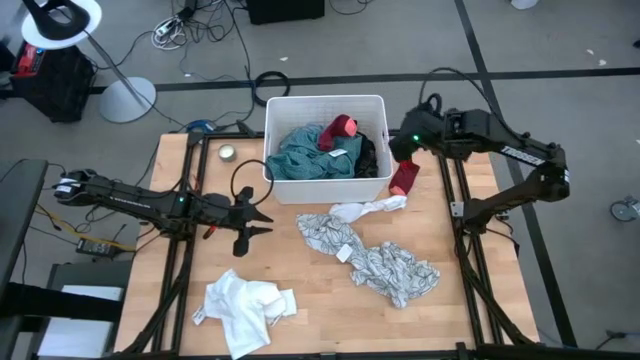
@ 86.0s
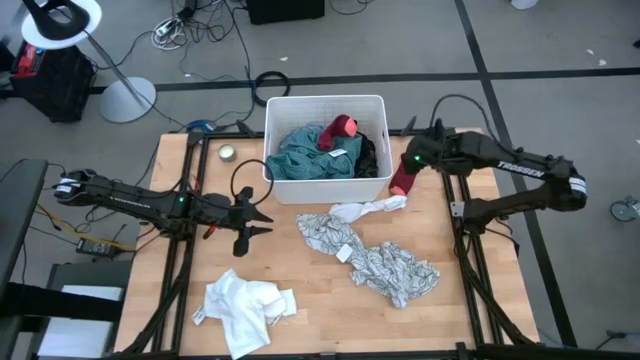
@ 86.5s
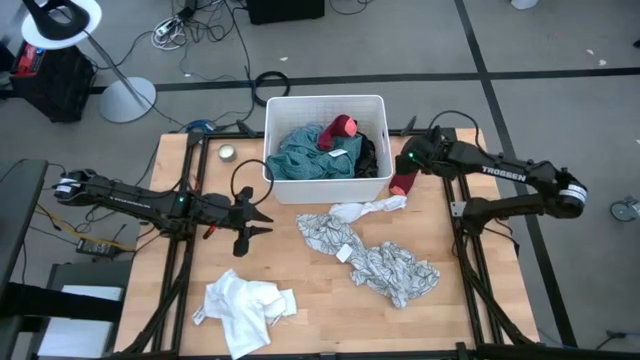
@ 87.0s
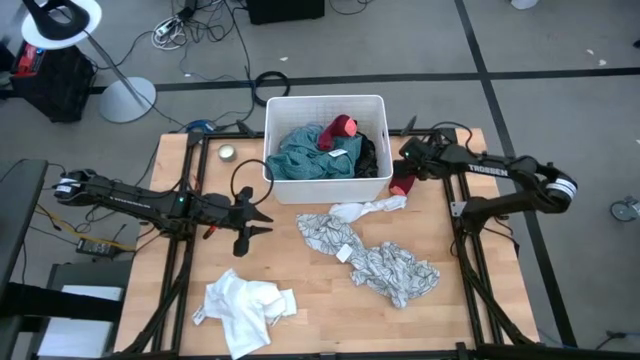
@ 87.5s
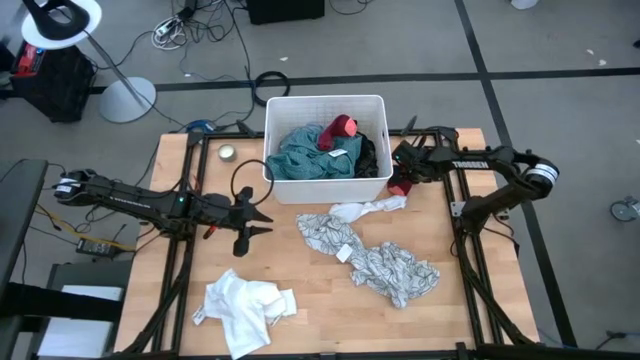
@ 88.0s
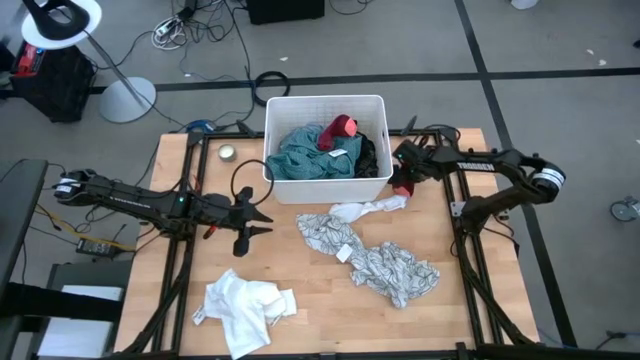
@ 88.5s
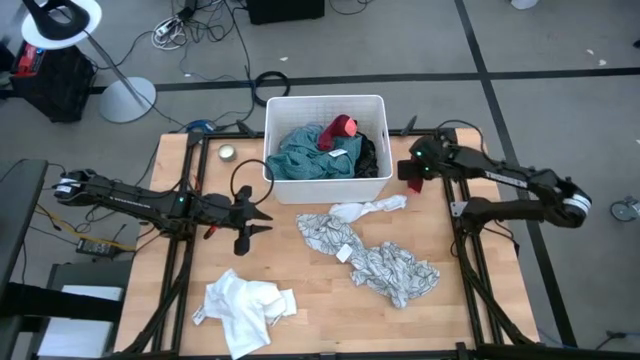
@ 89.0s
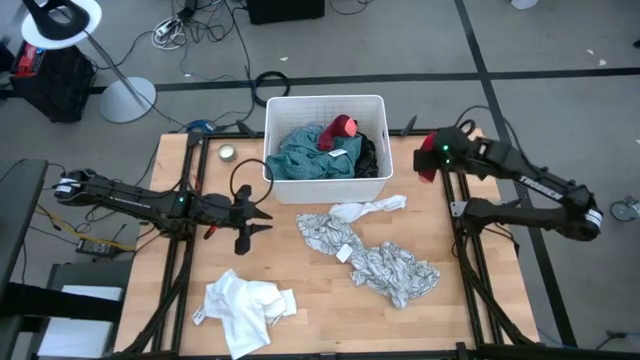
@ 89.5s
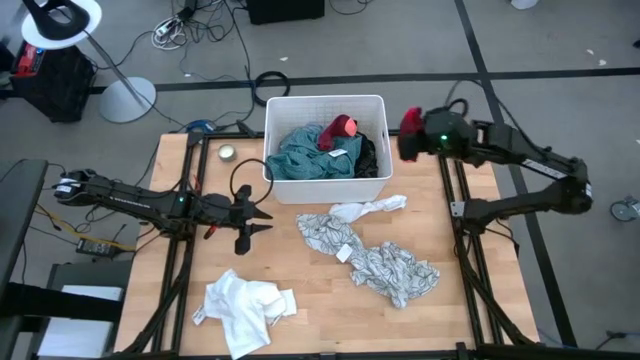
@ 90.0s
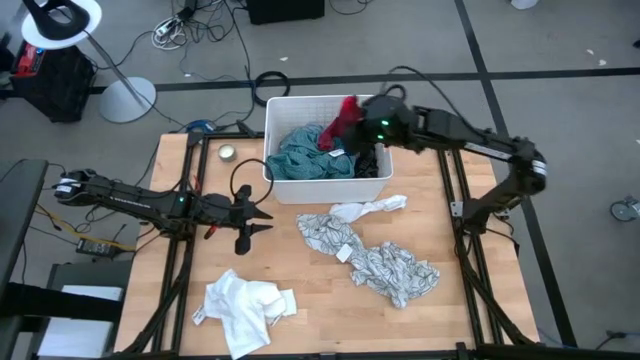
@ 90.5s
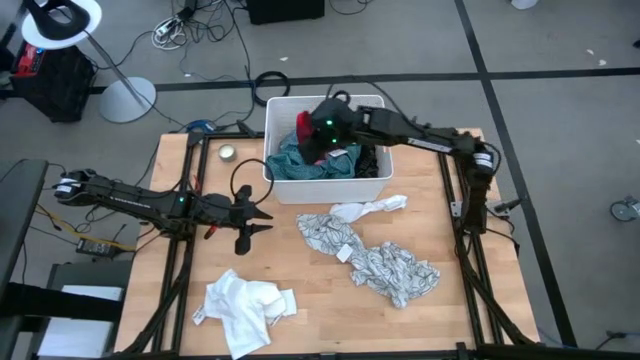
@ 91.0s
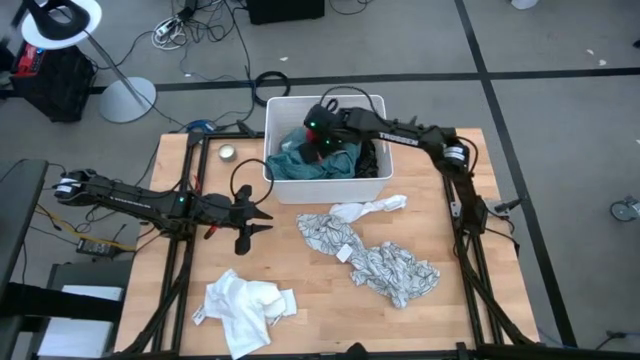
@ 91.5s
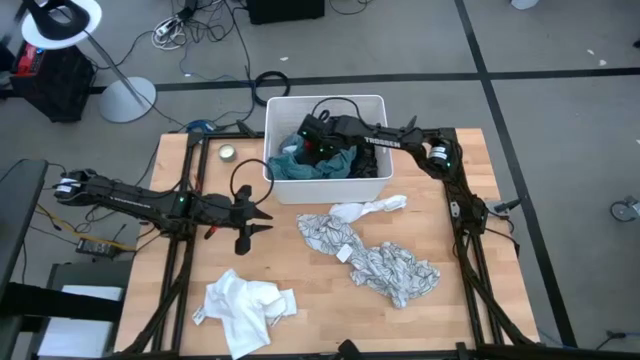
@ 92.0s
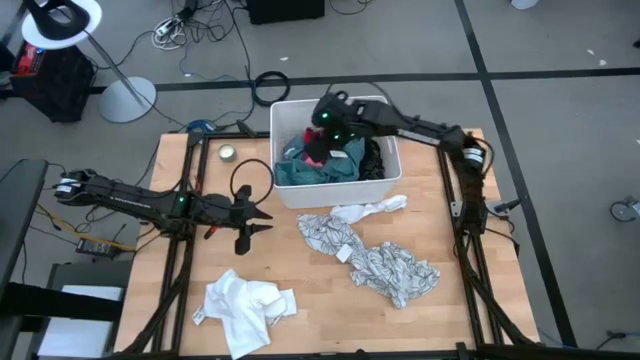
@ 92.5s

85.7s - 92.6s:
Task: Sort clothes
Put the red sock into the white laundry organizer

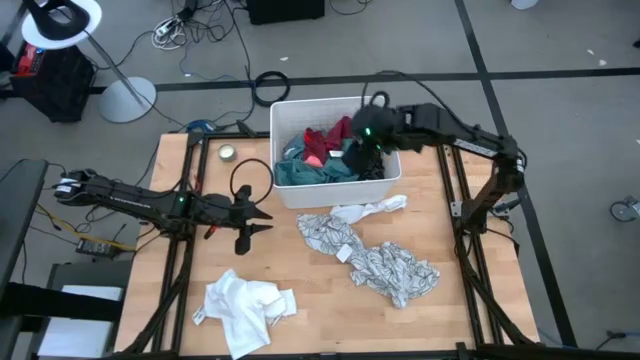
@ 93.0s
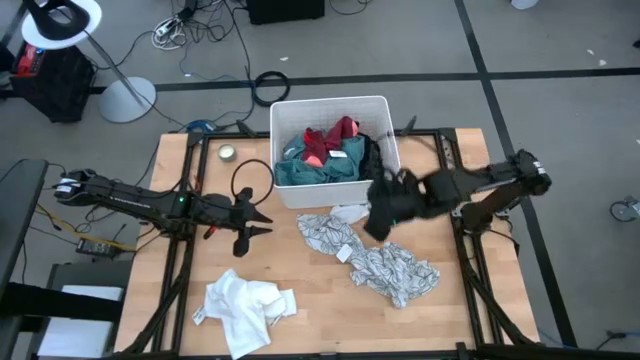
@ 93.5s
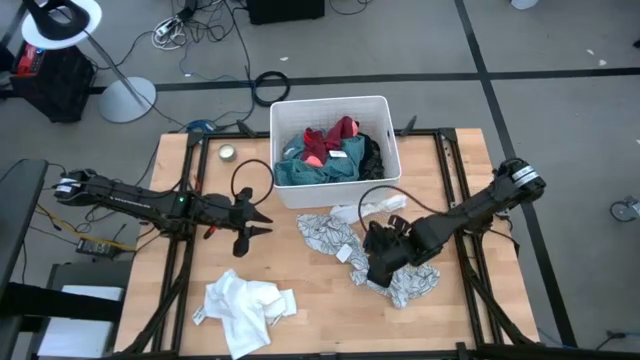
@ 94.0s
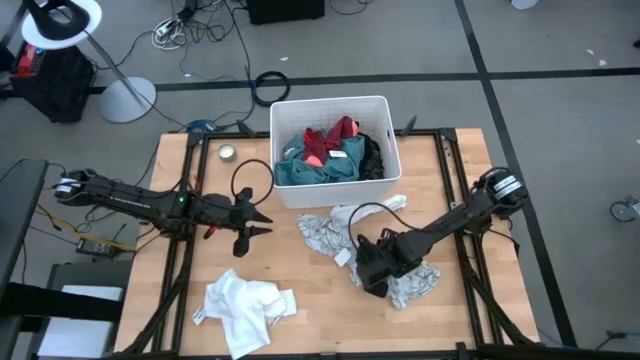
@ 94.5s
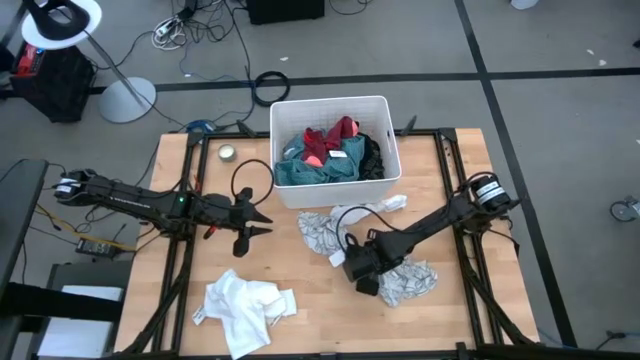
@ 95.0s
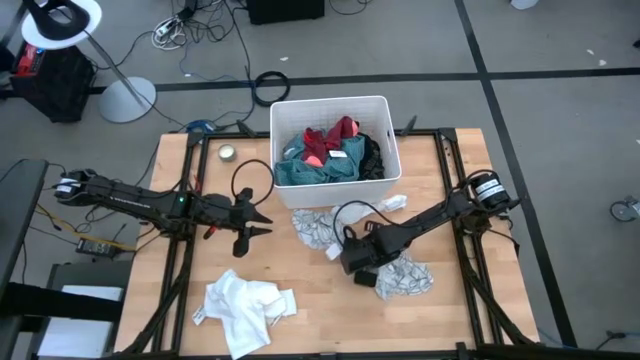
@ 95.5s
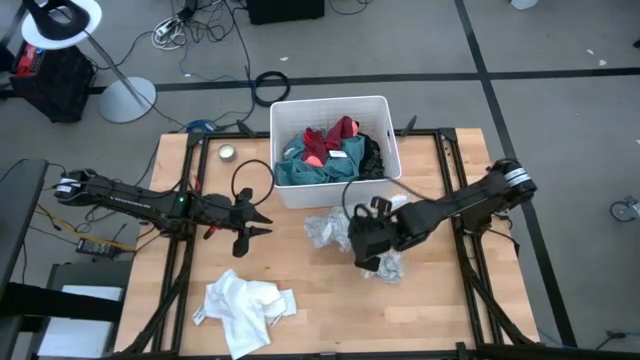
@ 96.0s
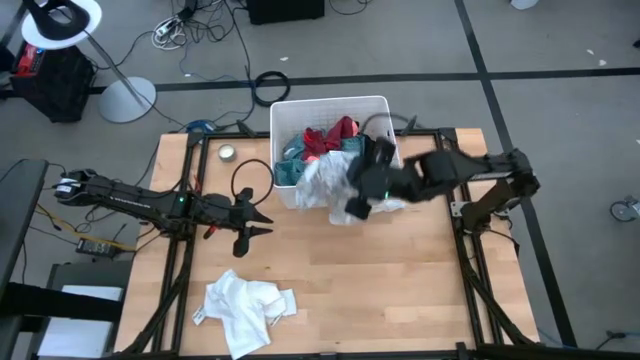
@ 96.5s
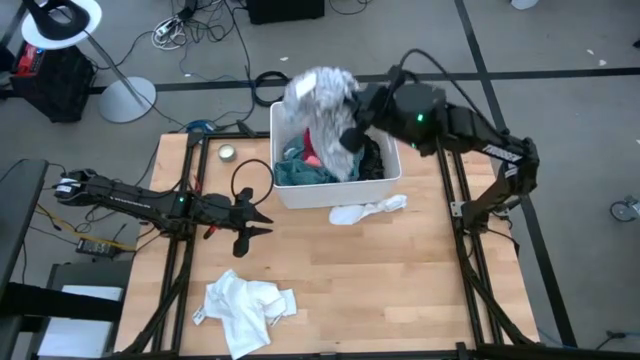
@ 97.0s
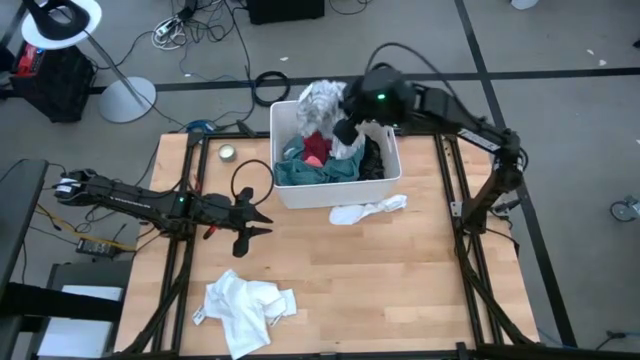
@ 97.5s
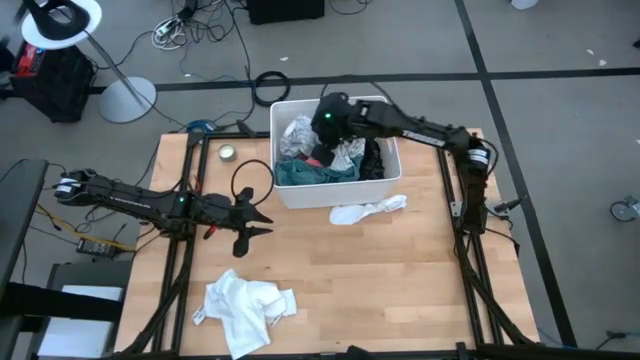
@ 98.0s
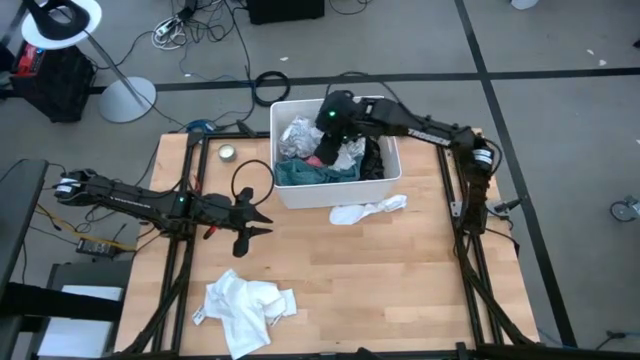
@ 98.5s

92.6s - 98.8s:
Put the white and black towel into the white laundry organizer

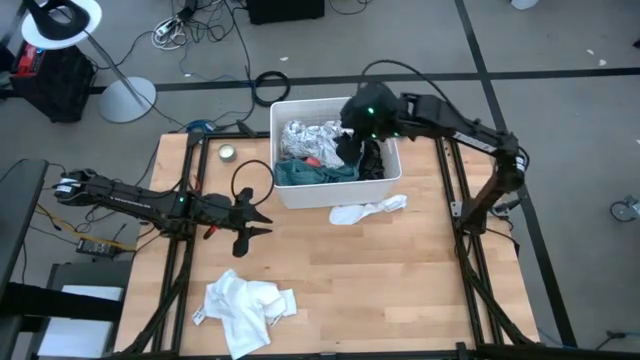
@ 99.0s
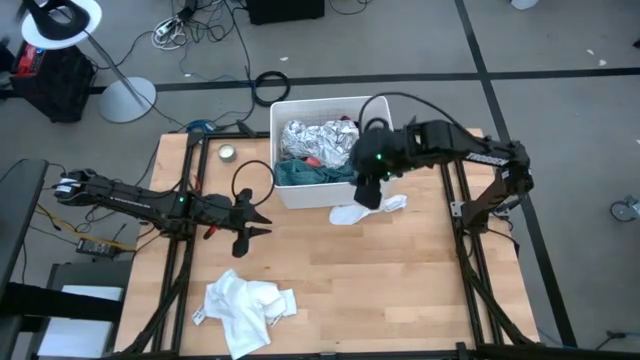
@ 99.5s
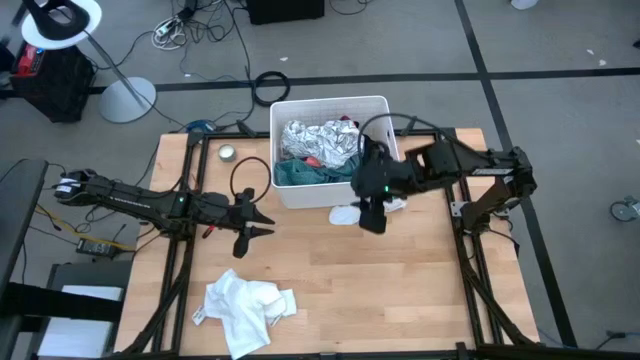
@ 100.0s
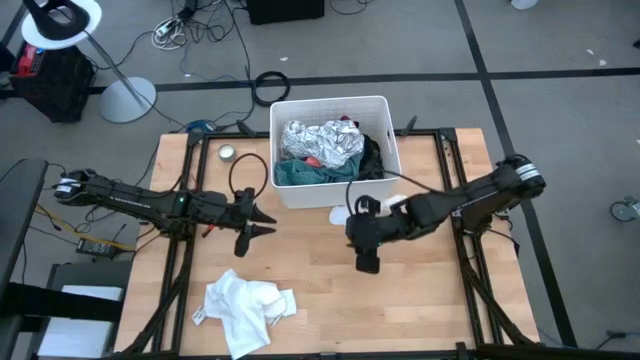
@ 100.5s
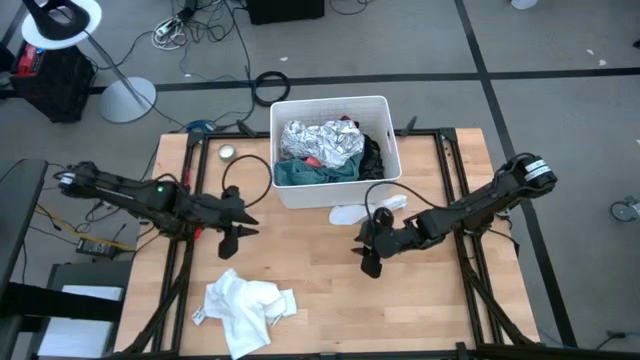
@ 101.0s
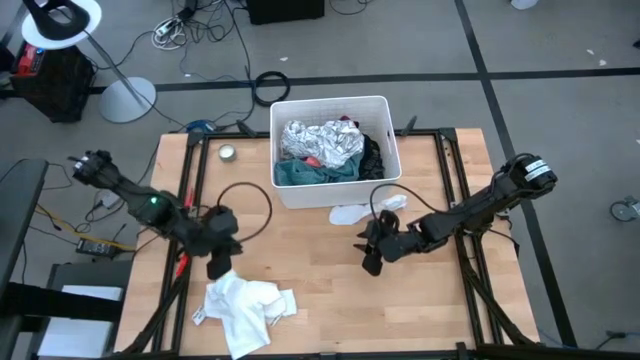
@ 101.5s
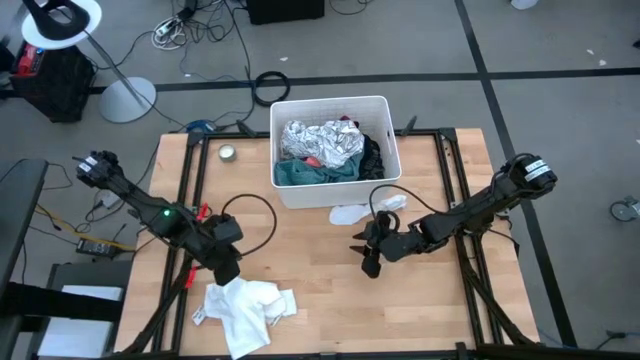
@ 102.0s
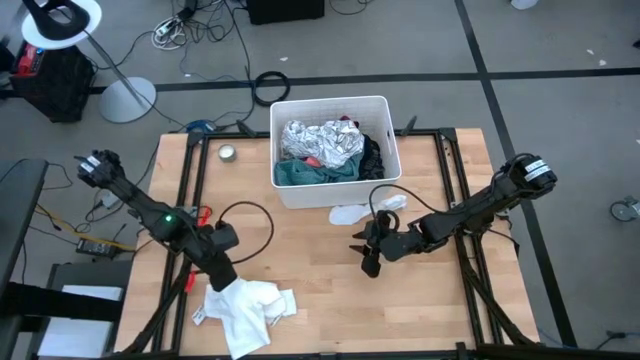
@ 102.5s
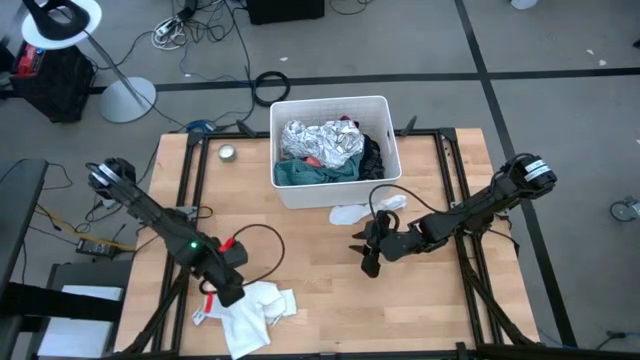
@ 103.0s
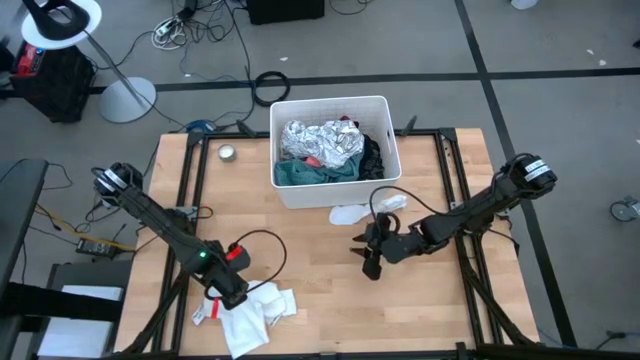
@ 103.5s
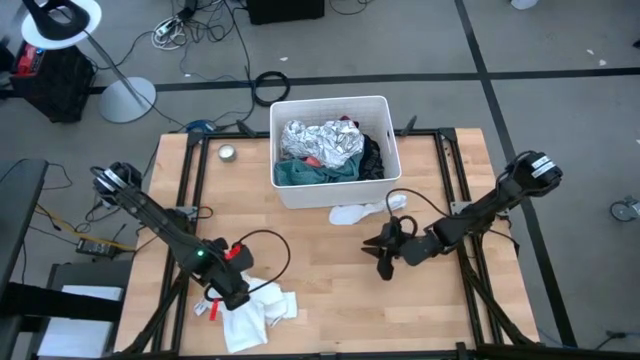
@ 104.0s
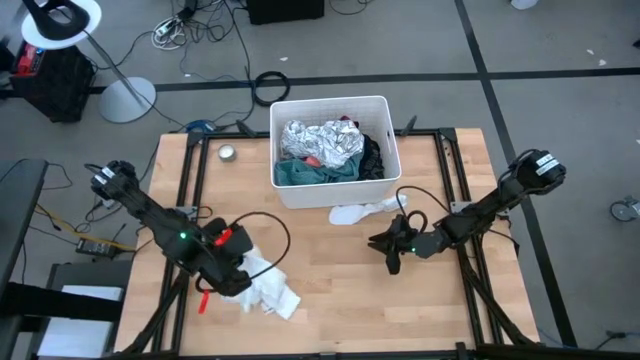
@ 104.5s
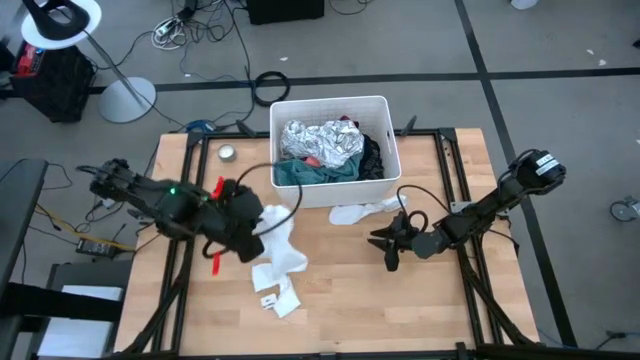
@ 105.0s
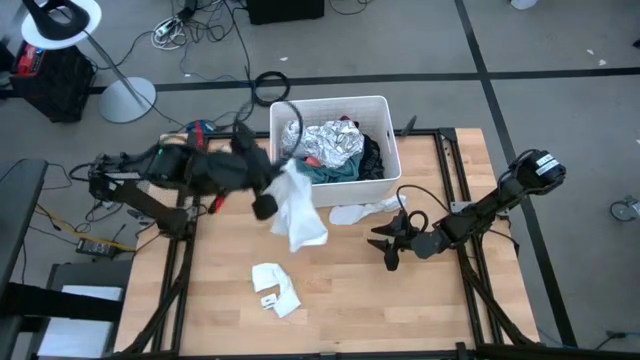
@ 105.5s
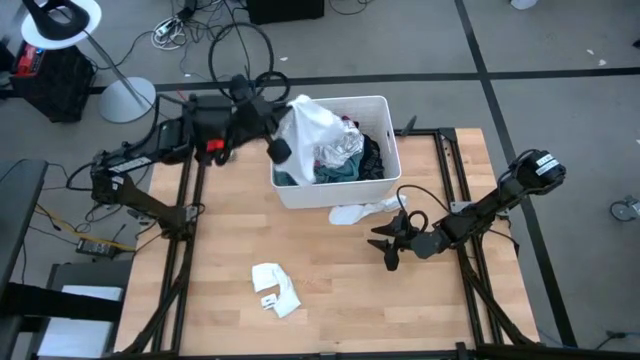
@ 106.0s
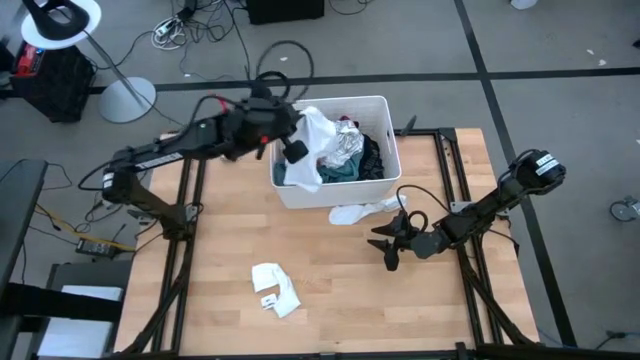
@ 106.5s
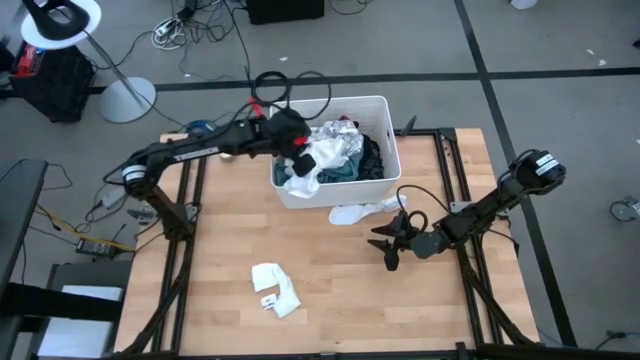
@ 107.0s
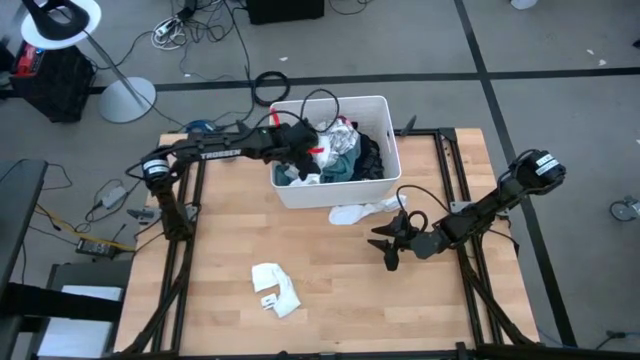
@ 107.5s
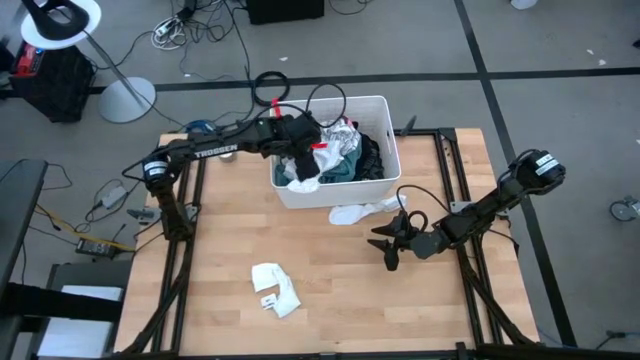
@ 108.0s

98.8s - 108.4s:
Put the white pants into the white laundry organizer
